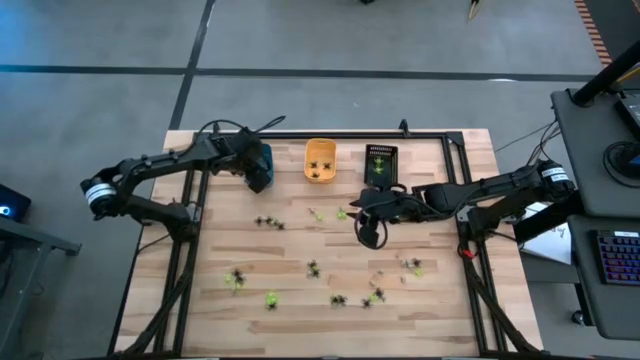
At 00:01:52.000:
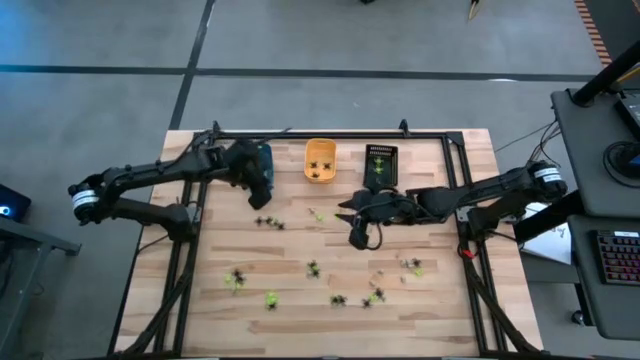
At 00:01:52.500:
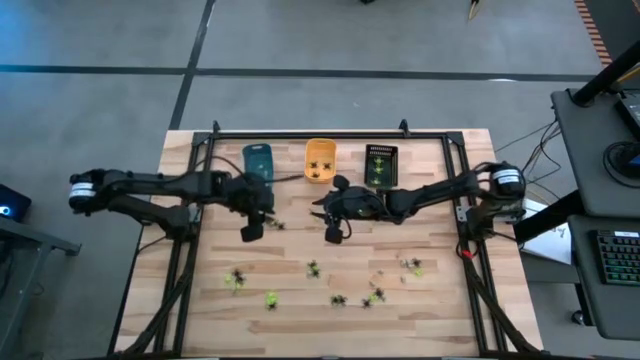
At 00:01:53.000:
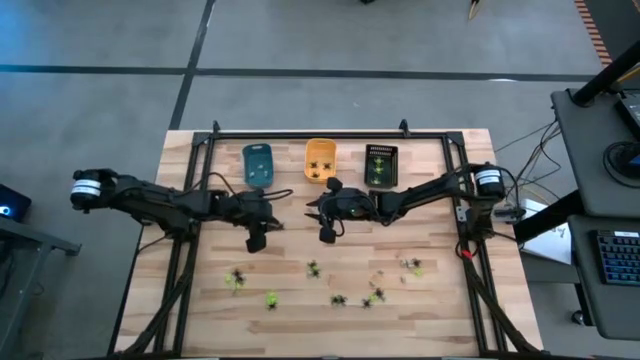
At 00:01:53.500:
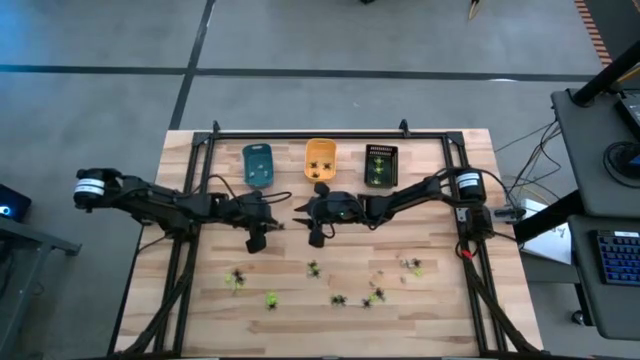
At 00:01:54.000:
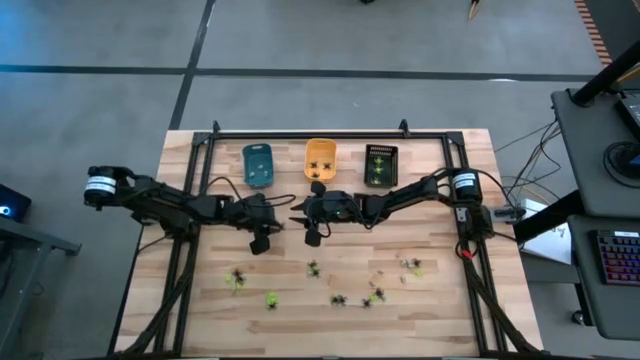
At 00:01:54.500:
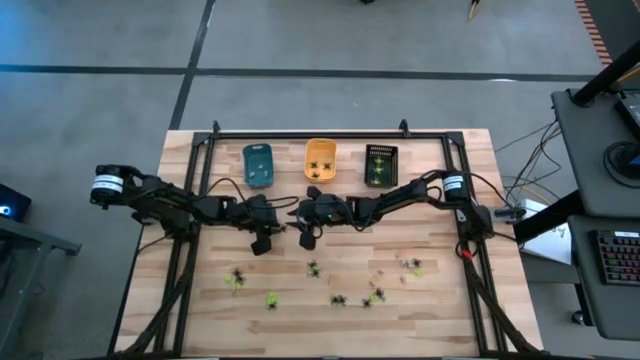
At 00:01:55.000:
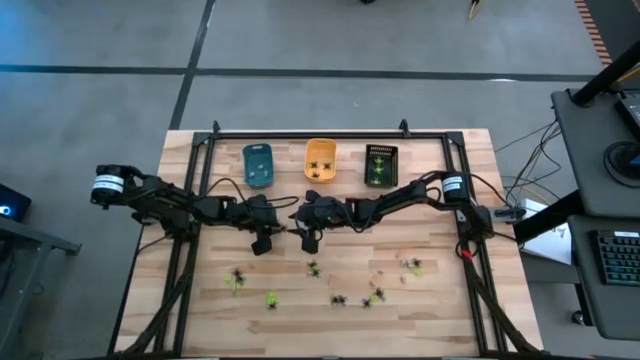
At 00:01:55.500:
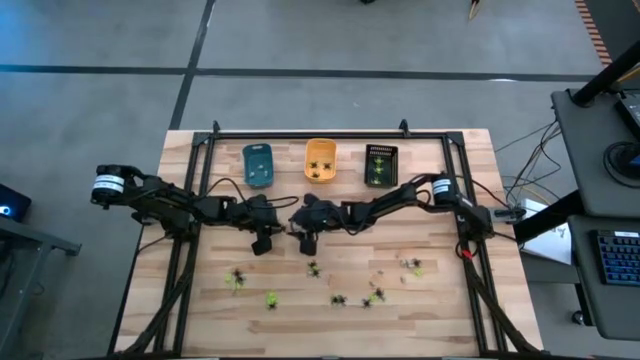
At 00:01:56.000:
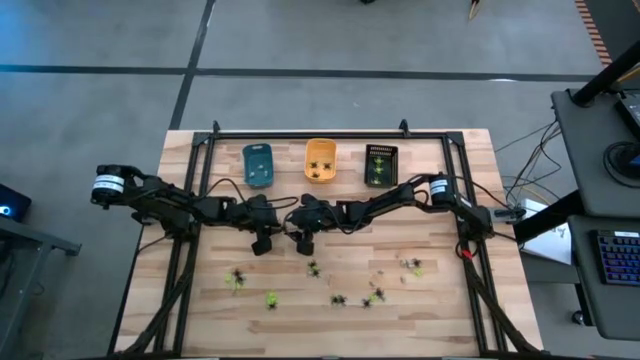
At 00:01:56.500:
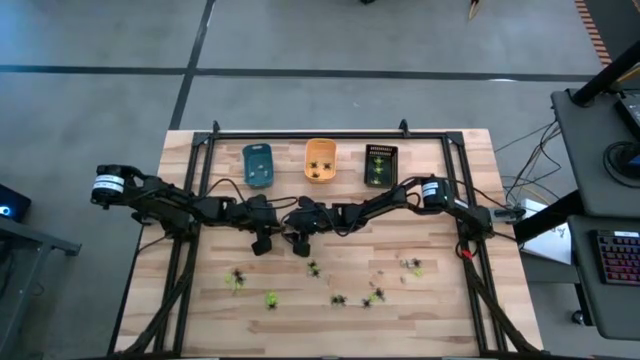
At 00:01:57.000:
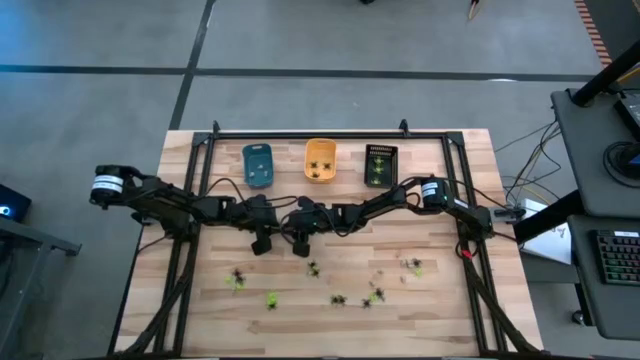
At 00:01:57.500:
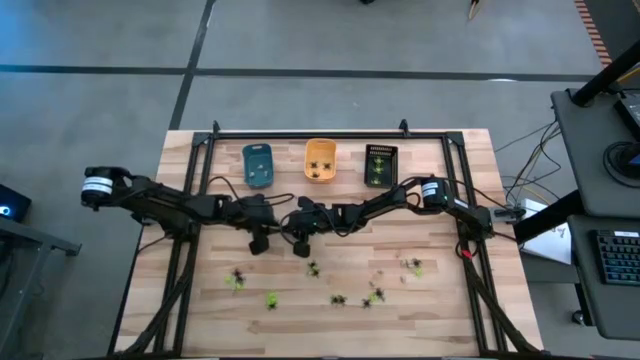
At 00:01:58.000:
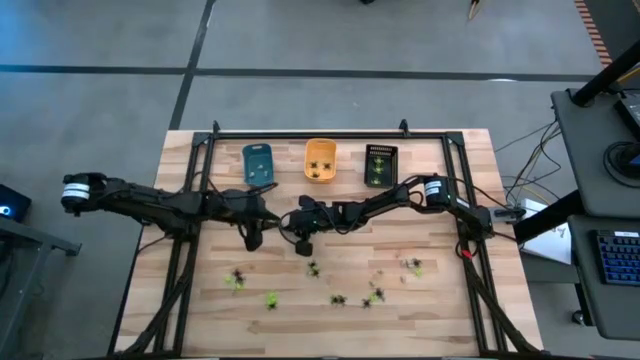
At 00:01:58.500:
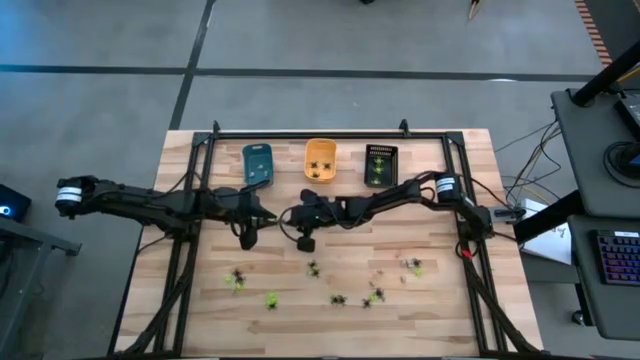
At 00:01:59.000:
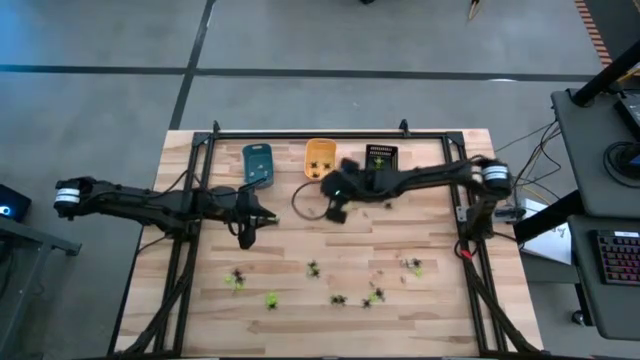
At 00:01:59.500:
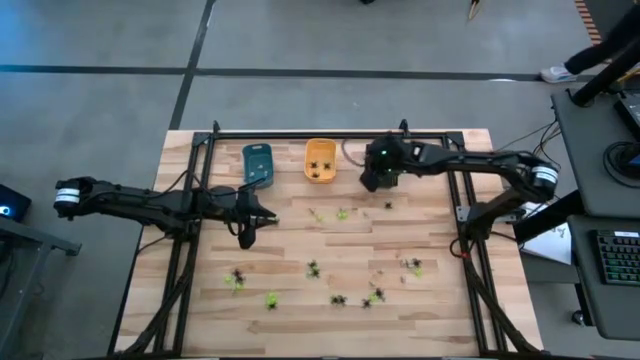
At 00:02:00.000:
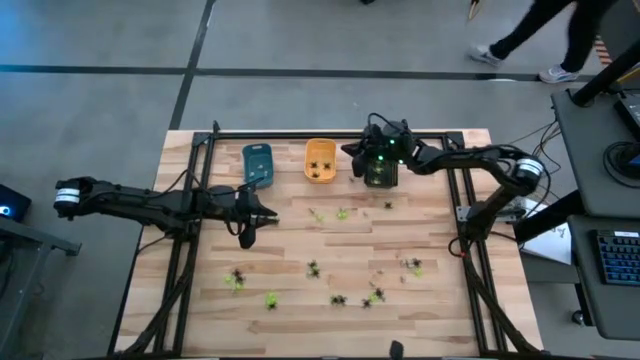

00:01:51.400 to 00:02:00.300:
Task: Sort Halloween decoration
Put the black spider toy into the orange bin

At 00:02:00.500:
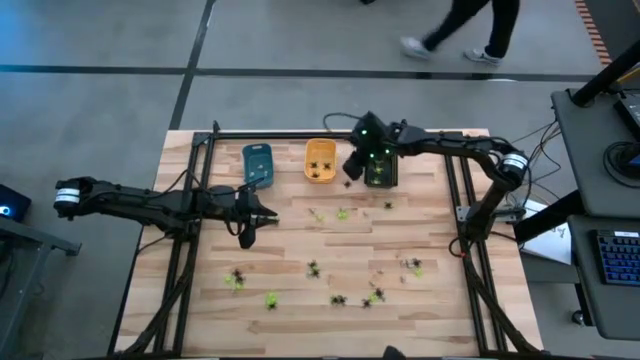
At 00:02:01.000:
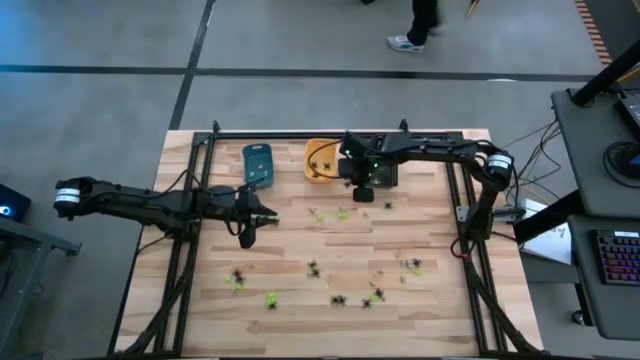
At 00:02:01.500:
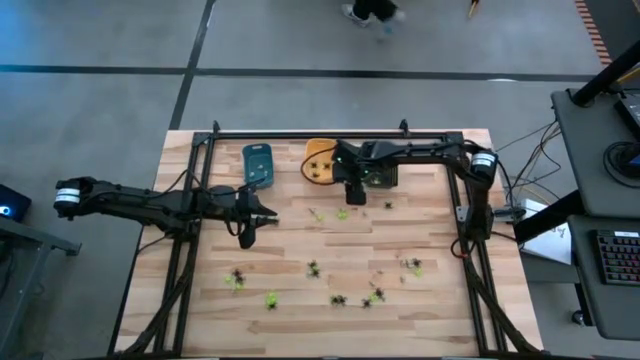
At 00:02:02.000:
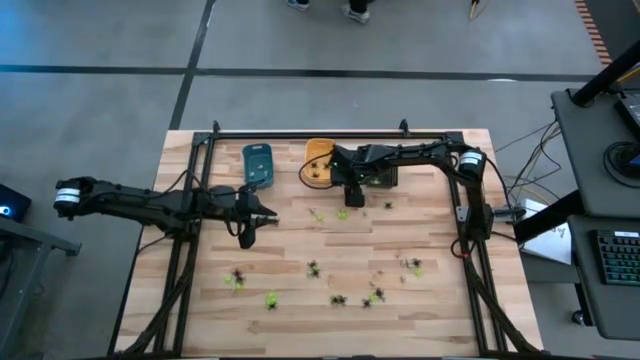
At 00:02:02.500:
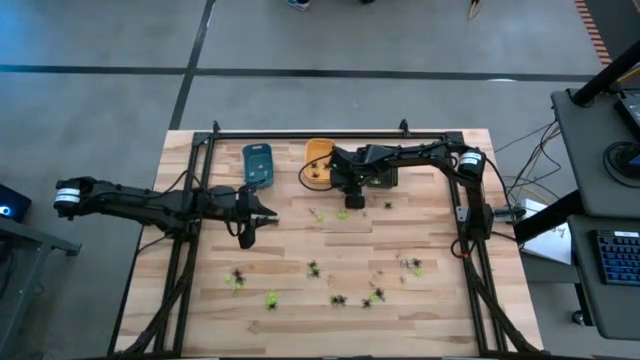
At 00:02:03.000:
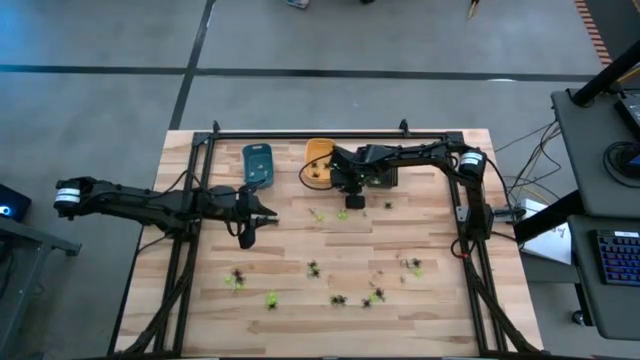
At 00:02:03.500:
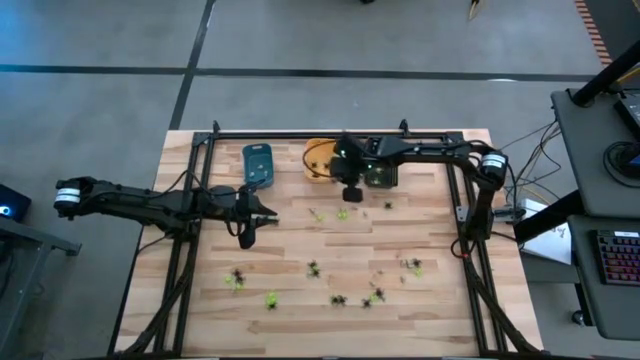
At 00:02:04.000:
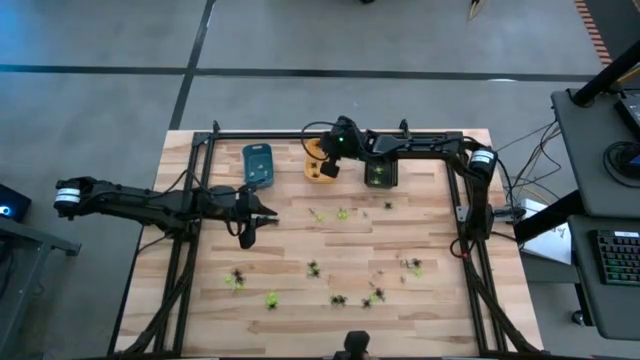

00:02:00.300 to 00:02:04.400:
Put the black spider toy into the orange bin

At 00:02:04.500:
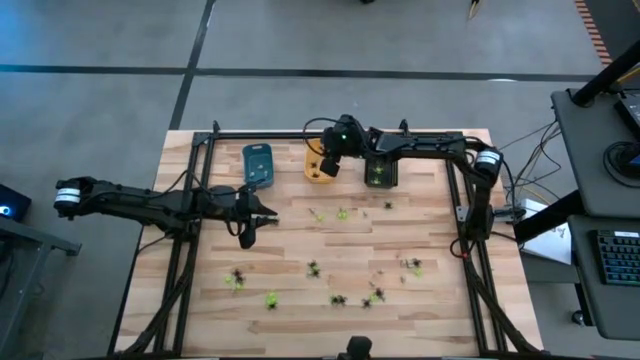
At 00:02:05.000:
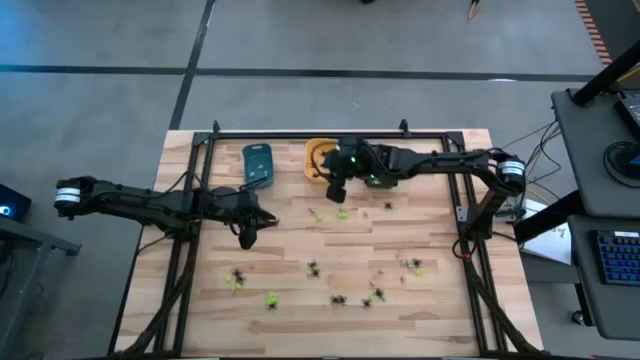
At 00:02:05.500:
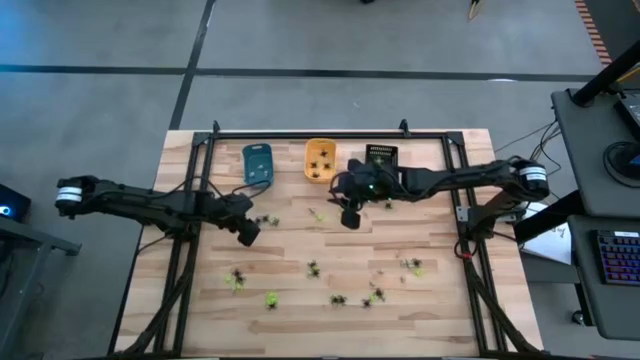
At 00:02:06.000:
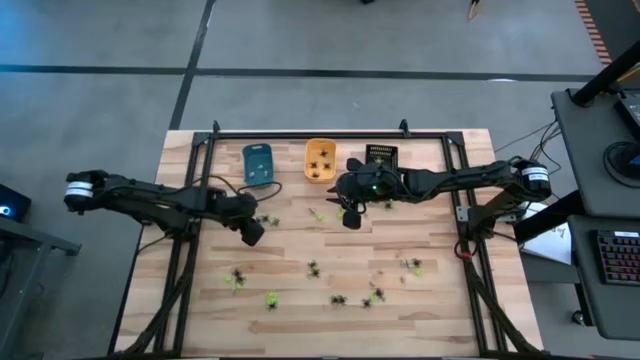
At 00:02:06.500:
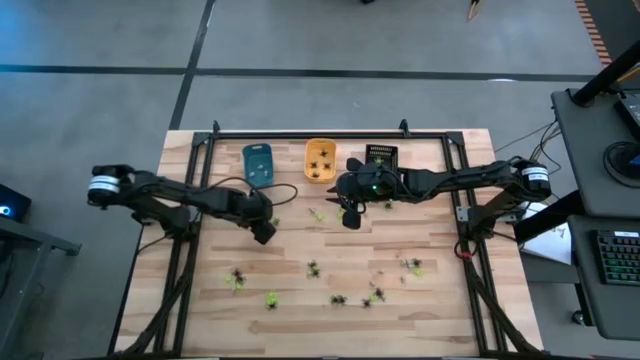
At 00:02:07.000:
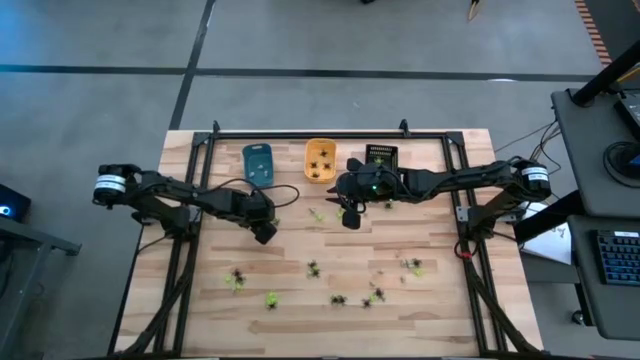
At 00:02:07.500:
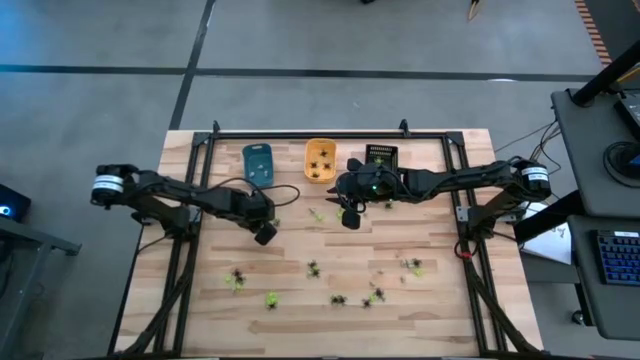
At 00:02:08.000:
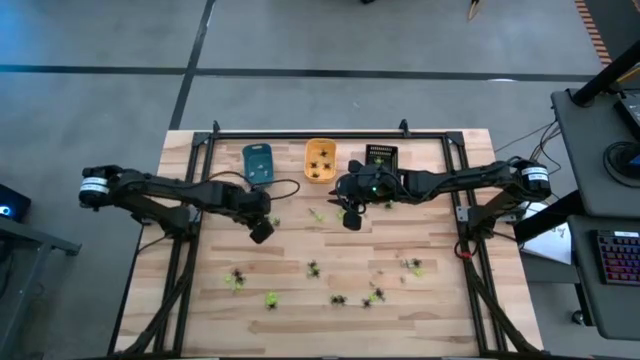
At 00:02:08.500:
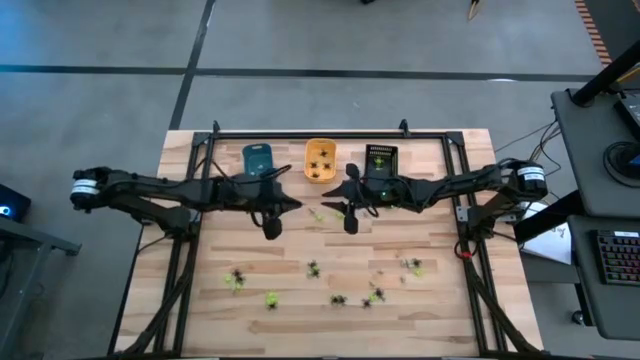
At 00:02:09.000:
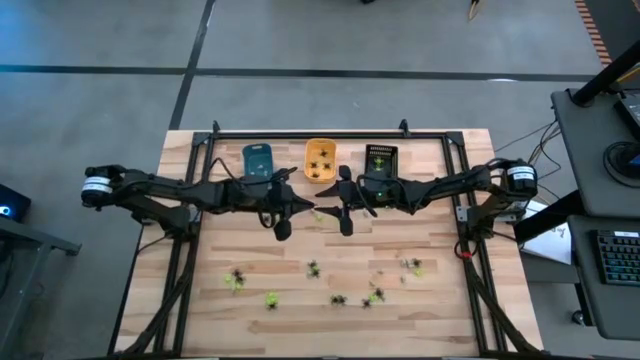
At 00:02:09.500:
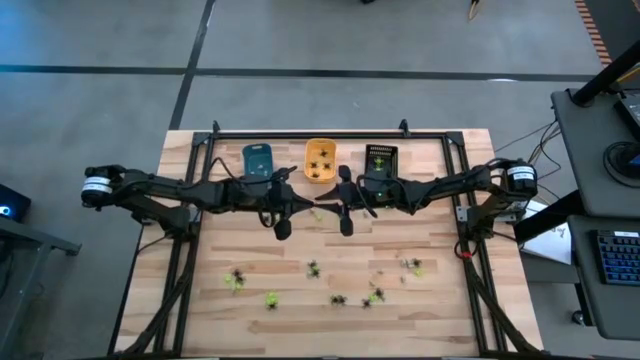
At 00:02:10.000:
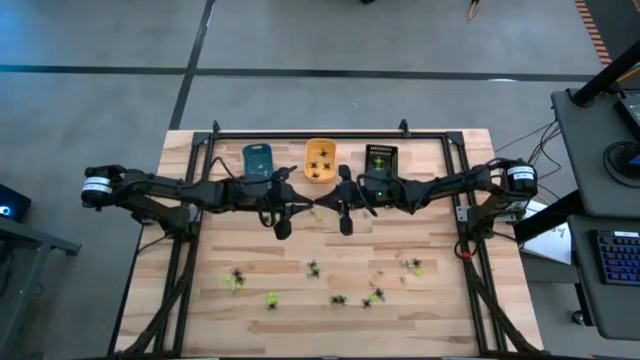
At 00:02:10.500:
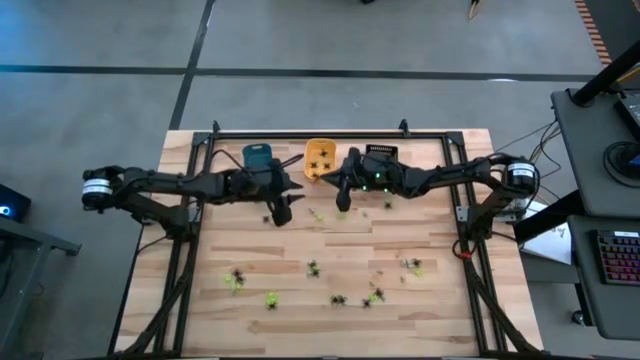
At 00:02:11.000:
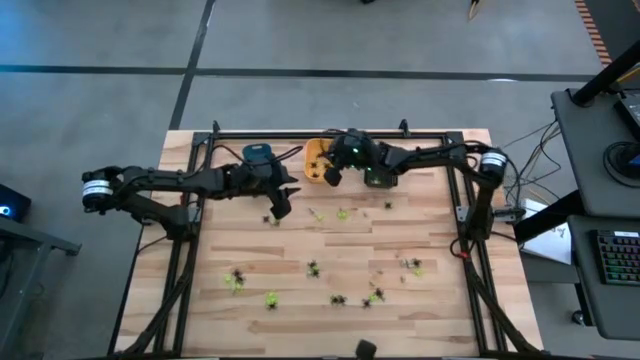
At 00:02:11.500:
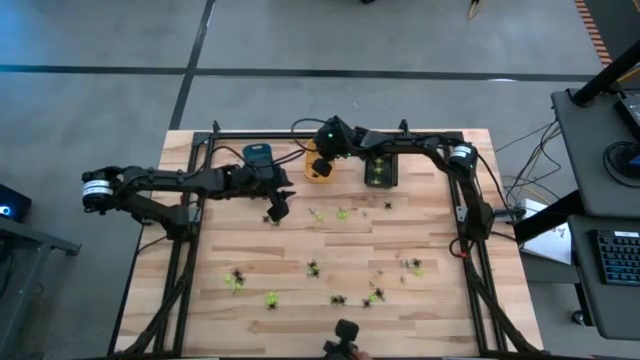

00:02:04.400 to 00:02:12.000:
Put the black spider toy into the orange bin
